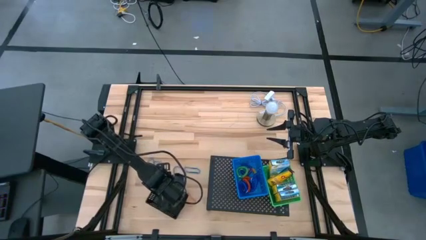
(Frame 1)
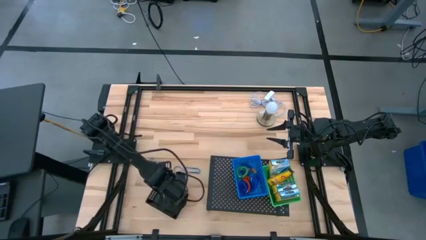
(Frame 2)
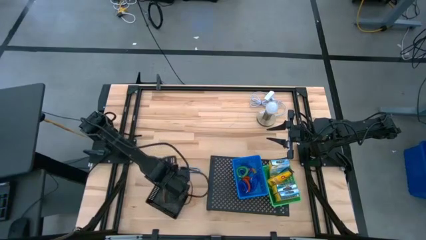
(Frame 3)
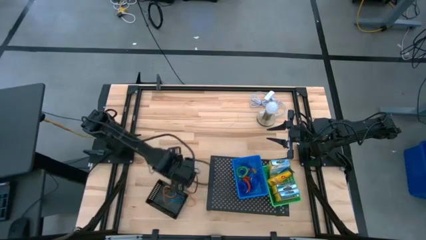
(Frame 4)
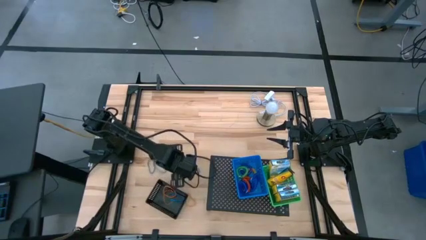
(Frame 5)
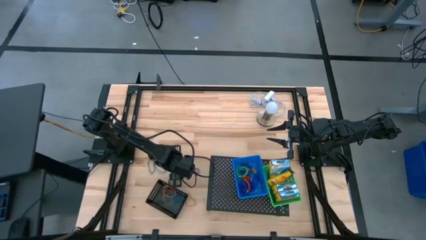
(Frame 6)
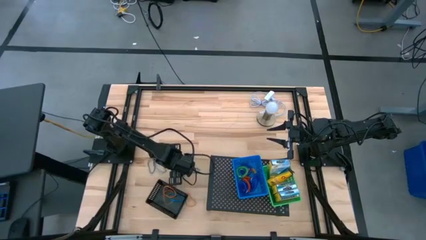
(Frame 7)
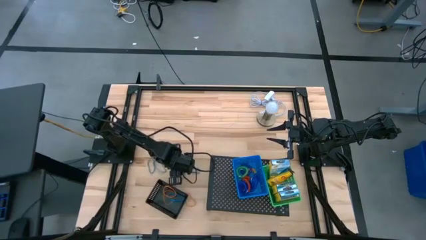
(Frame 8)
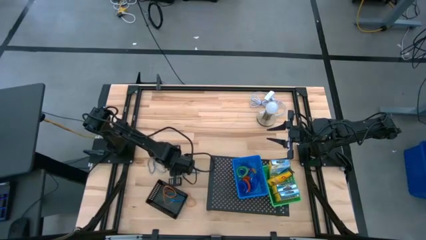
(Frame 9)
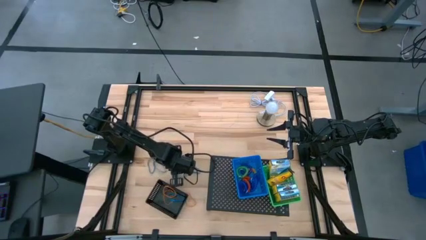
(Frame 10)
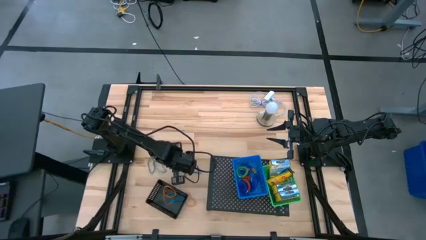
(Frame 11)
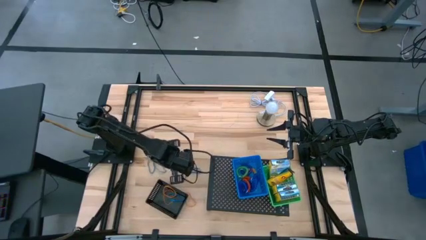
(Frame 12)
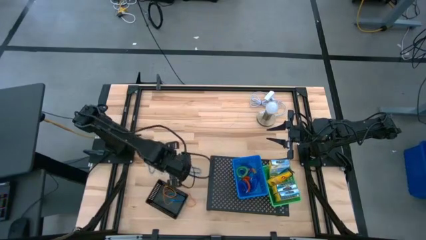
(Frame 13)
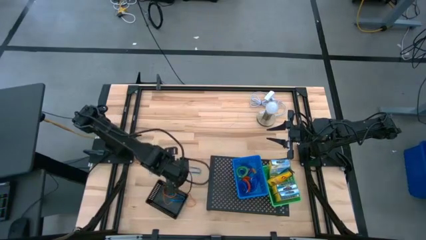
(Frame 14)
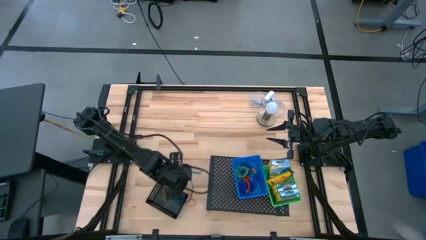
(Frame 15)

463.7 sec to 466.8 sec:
Task: Pick & Place Office Desk Supplies
Put the blue rubber band into the black bin

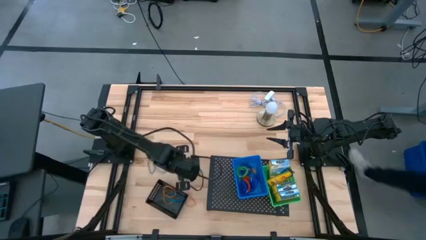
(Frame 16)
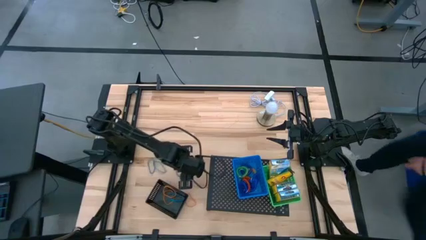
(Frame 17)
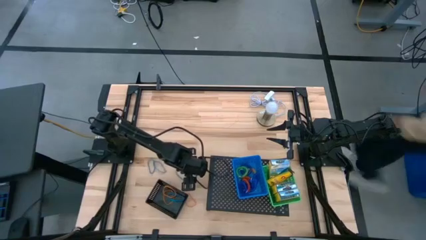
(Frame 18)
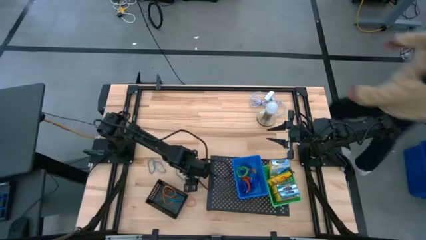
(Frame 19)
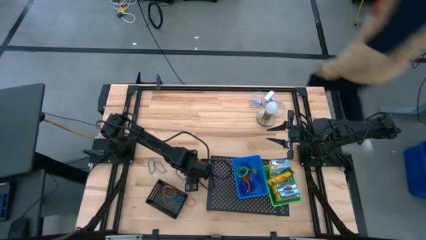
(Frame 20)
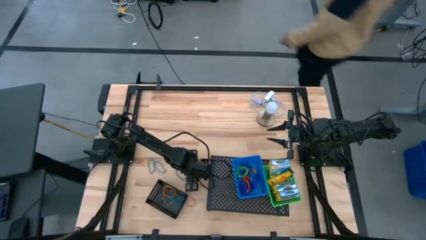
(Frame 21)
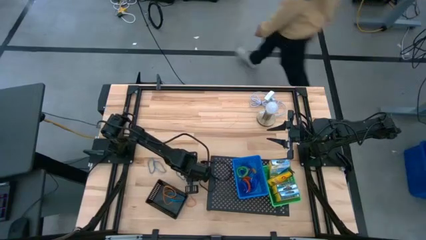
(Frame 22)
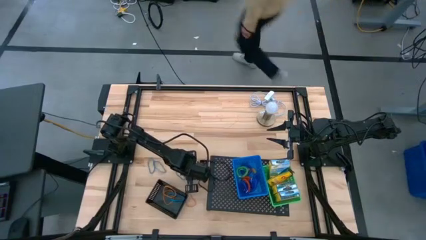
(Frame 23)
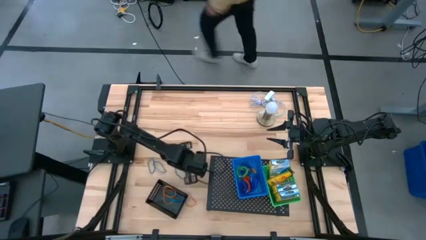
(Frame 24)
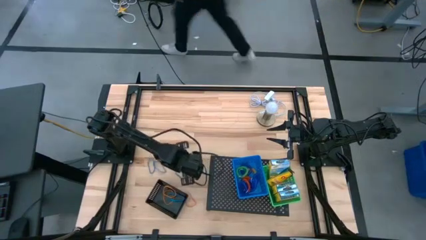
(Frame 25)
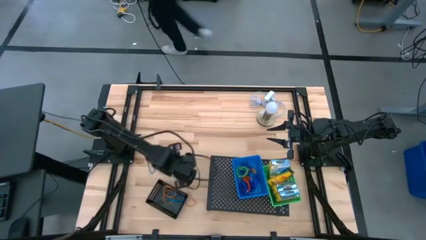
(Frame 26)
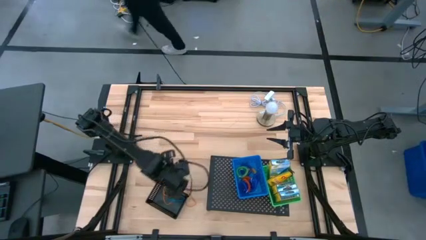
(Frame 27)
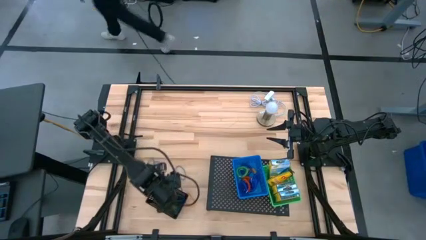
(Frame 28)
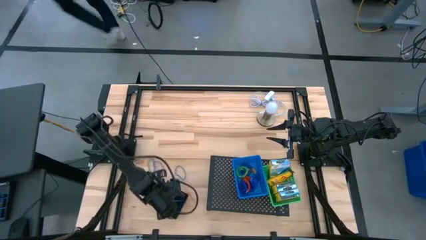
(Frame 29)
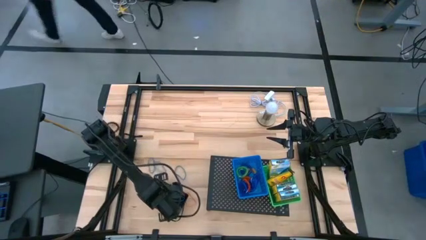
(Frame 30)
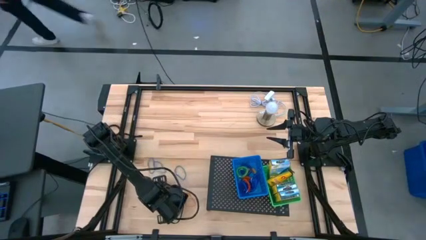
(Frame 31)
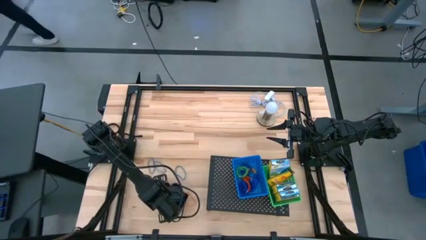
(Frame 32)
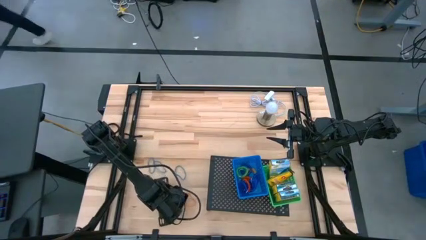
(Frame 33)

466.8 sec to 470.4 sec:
Put the blue rubber band into the black bin

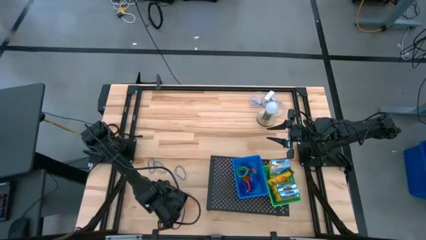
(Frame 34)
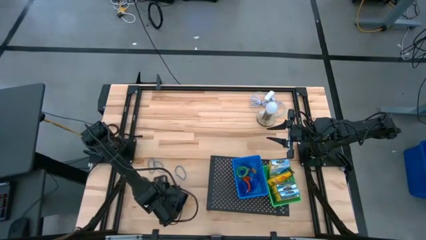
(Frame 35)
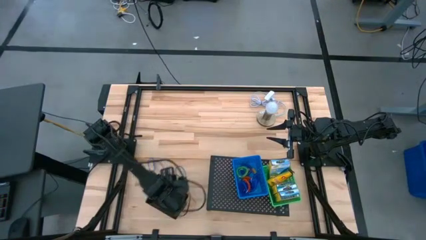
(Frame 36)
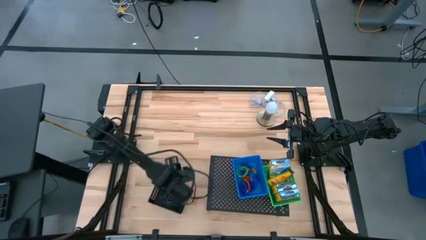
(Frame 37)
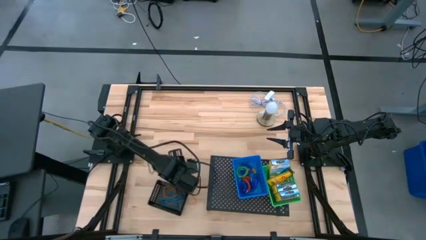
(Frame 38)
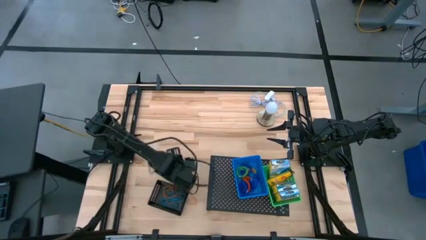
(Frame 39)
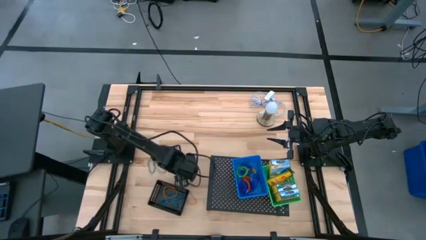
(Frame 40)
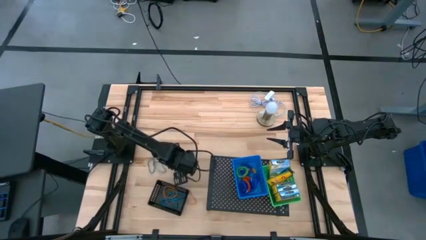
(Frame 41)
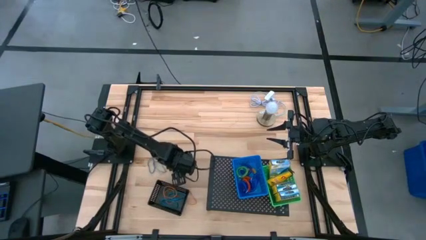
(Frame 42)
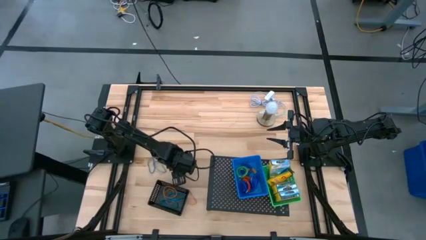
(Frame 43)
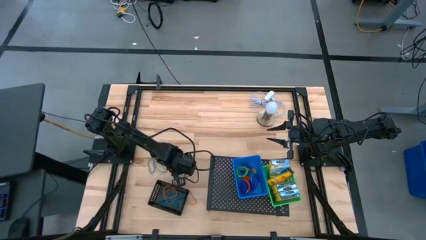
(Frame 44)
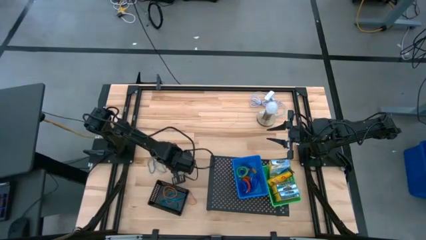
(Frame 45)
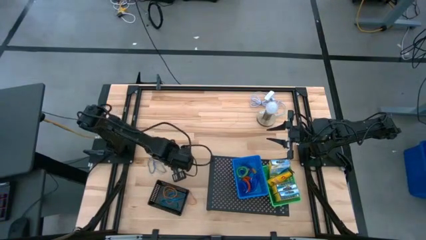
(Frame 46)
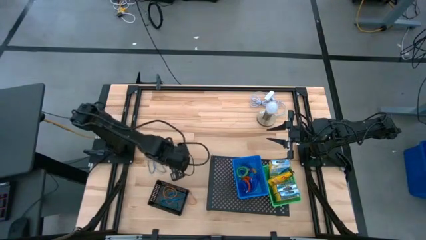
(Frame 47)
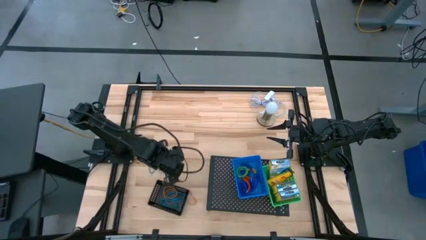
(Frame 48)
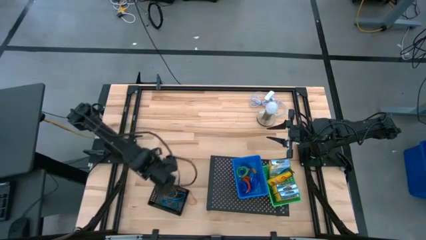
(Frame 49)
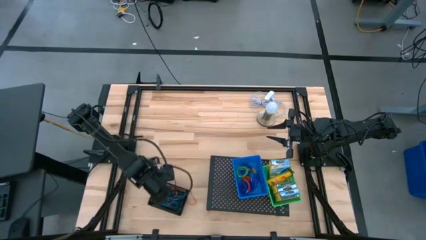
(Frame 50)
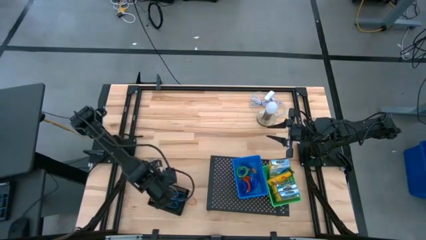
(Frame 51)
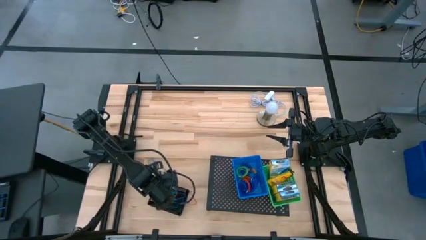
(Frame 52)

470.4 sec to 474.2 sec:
Put the right blue rubber band into the black bin

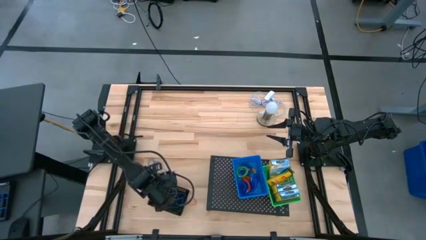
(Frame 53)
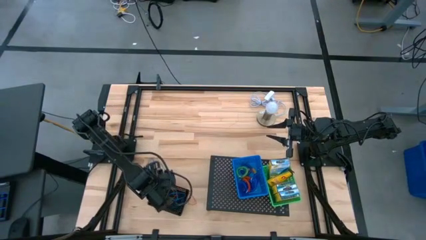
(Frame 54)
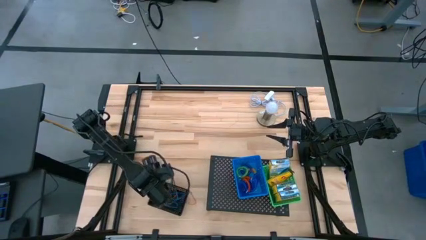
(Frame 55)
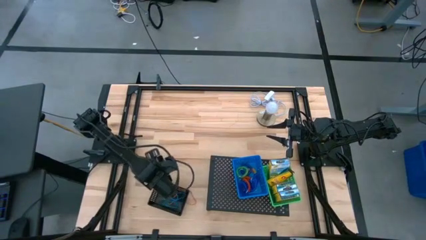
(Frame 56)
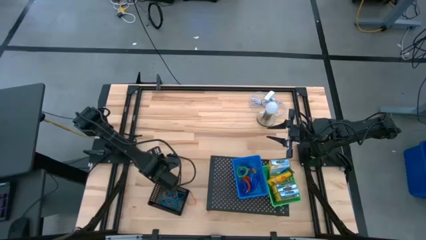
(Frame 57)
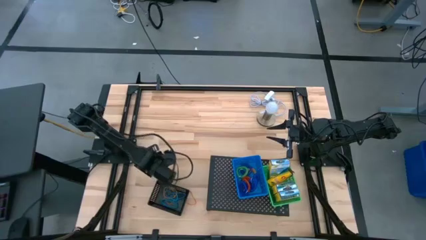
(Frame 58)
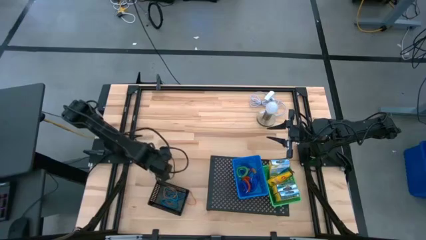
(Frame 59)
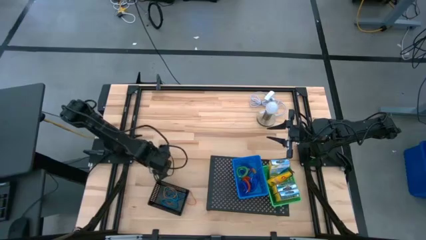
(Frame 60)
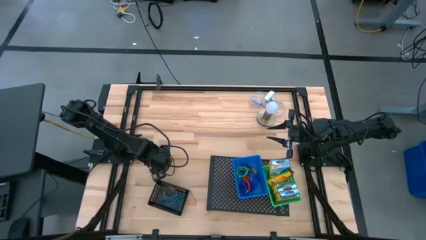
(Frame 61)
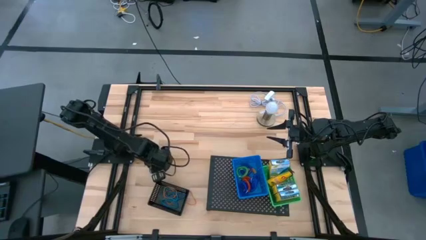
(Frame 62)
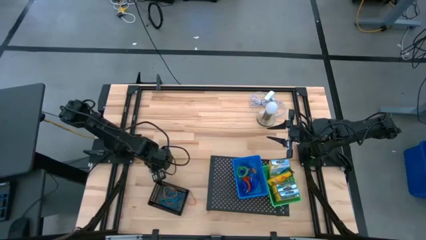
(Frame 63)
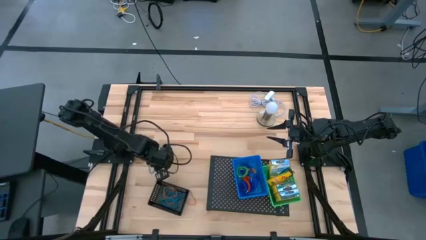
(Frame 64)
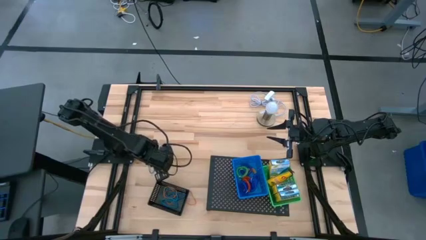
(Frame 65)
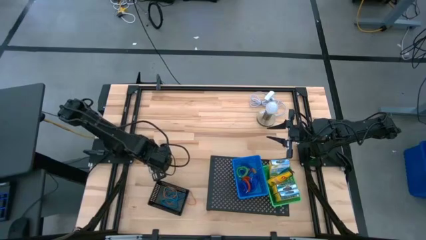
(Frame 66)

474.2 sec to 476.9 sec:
Put the right blue rubber band into the black bin

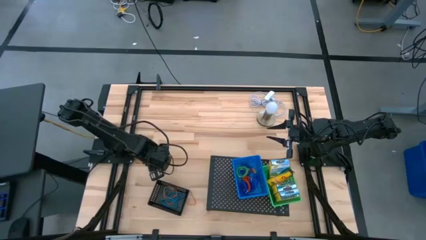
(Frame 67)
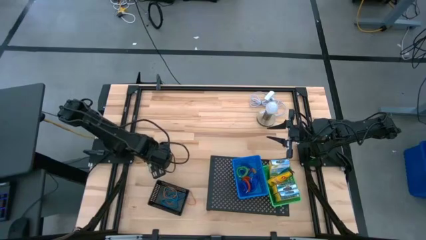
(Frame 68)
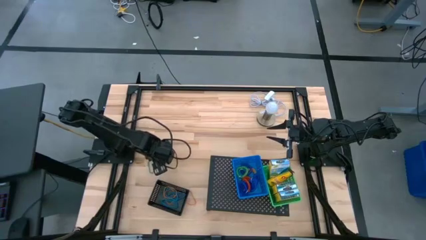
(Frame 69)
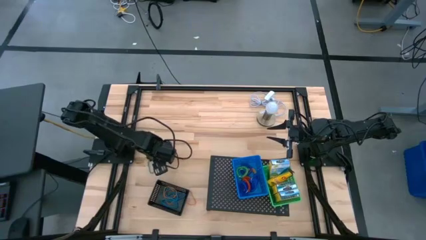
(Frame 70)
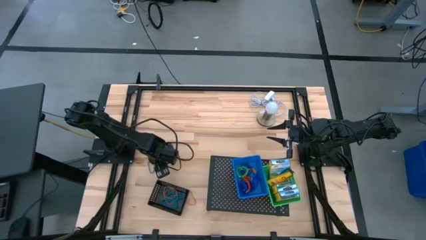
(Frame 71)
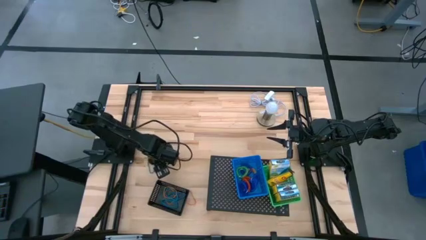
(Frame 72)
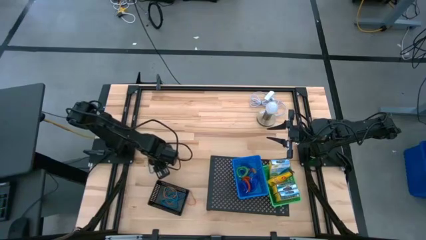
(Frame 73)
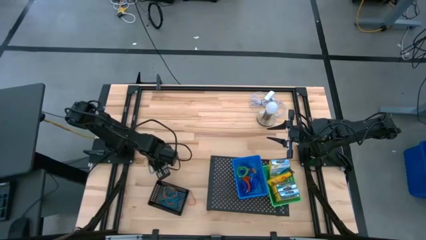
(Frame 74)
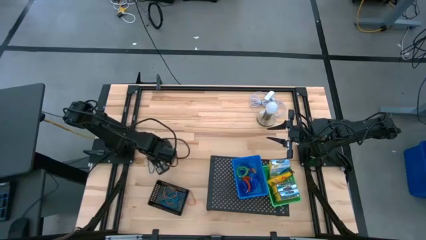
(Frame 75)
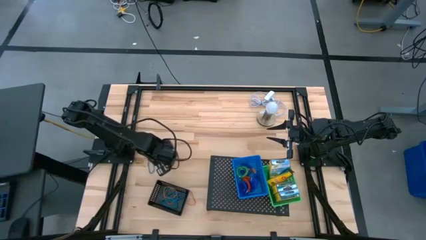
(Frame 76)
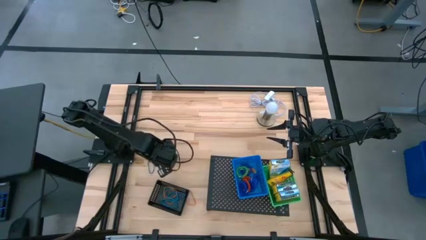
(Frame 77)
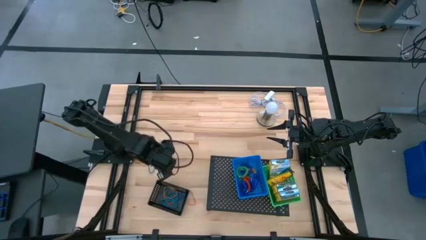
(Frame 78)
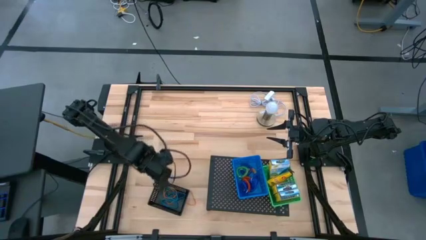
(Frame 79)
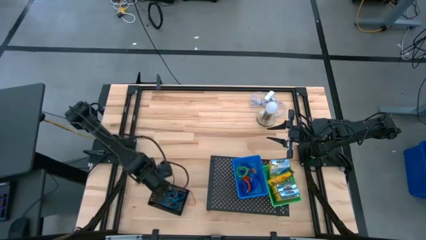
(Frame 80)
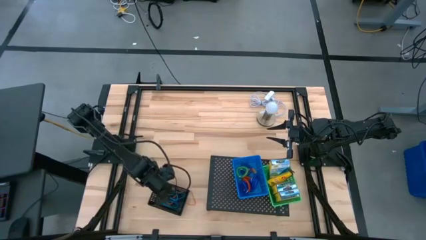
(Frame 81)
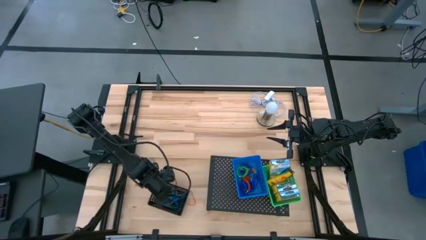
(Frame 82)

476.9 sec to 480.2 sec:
Put the right blue rubber band into the black bin
